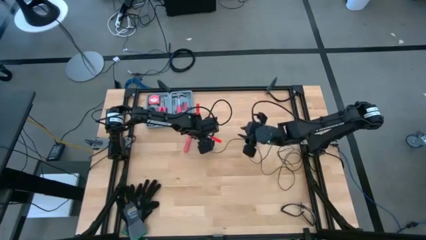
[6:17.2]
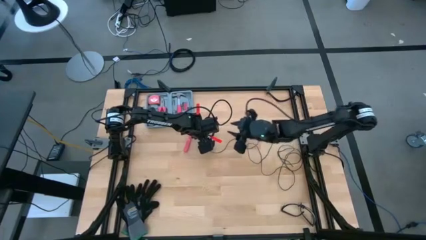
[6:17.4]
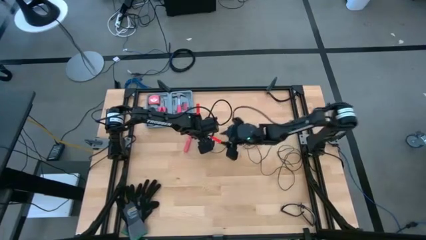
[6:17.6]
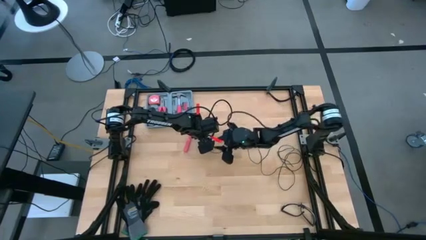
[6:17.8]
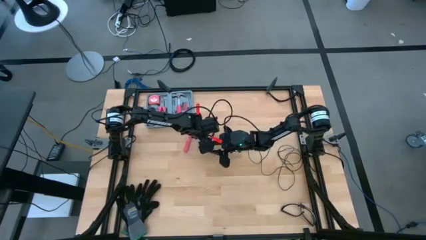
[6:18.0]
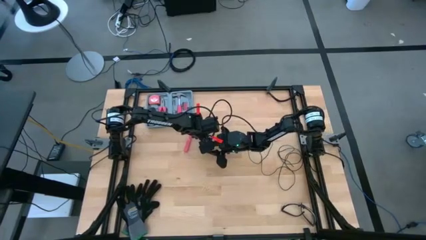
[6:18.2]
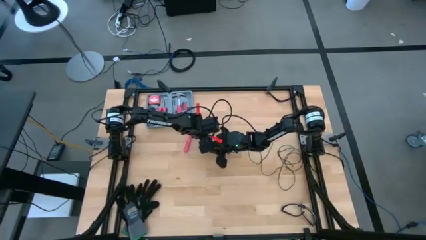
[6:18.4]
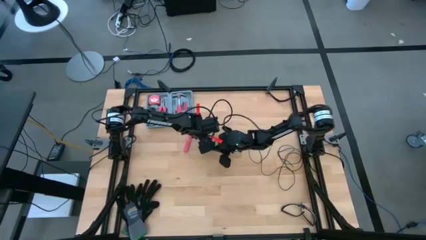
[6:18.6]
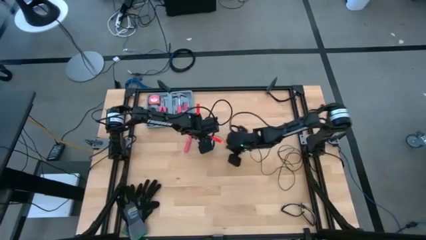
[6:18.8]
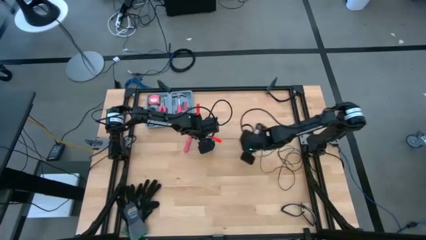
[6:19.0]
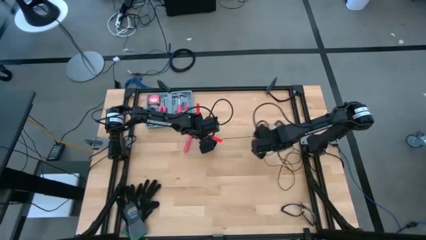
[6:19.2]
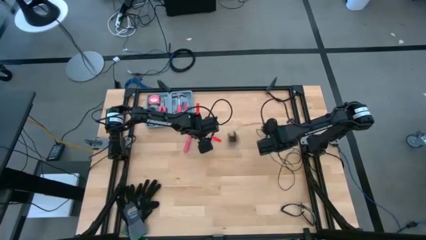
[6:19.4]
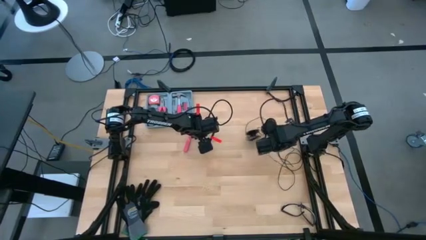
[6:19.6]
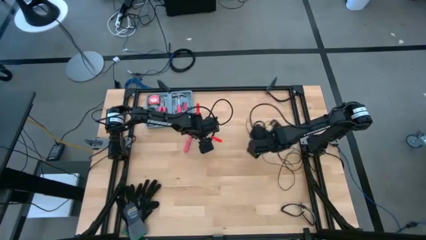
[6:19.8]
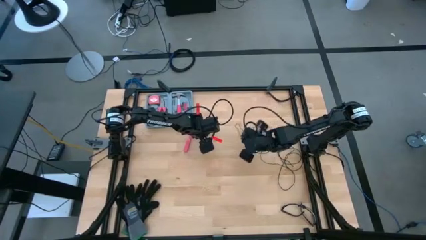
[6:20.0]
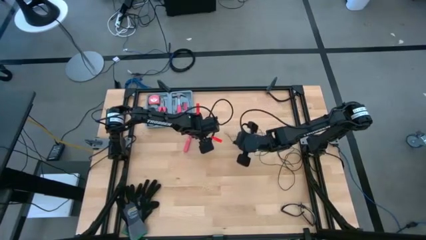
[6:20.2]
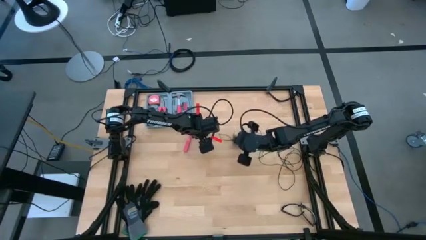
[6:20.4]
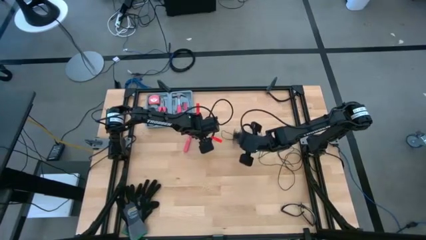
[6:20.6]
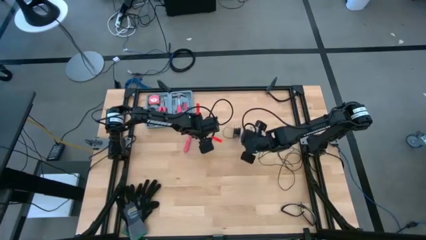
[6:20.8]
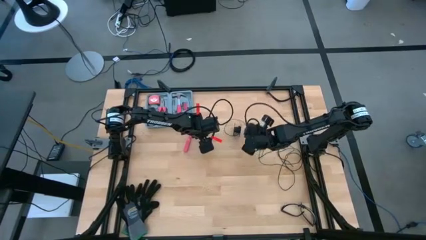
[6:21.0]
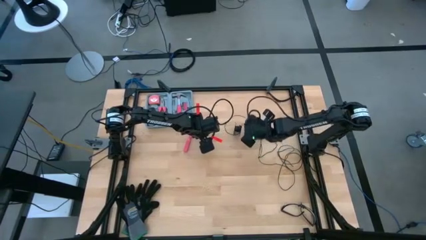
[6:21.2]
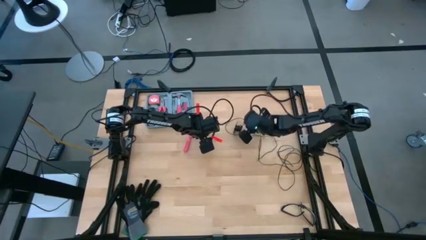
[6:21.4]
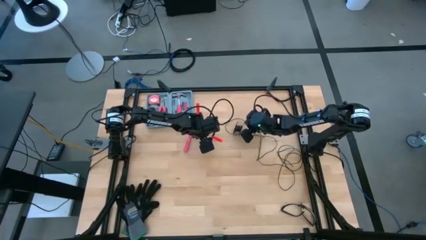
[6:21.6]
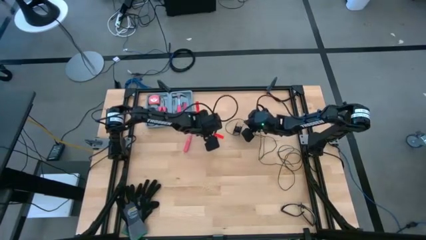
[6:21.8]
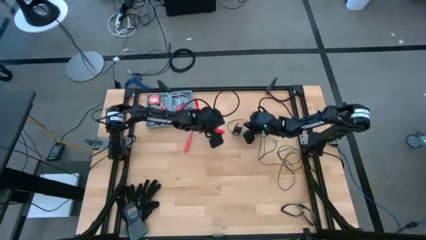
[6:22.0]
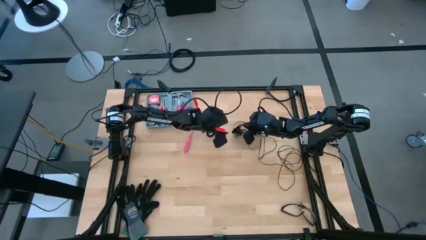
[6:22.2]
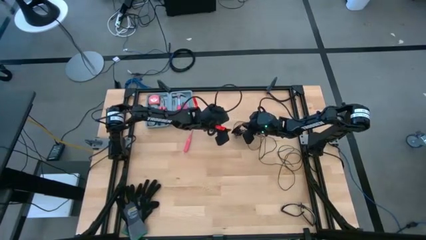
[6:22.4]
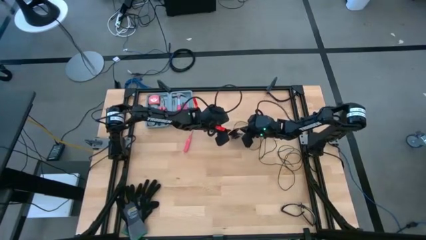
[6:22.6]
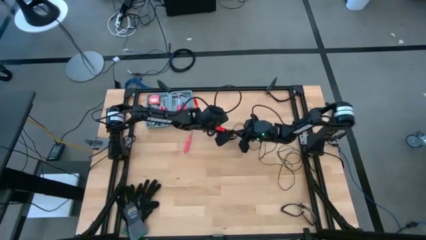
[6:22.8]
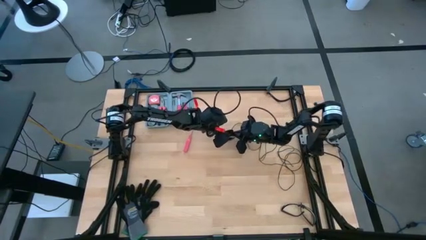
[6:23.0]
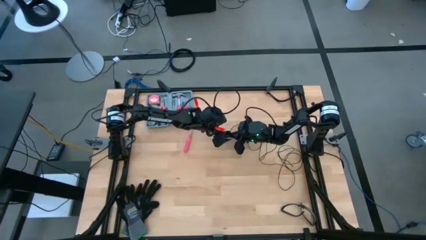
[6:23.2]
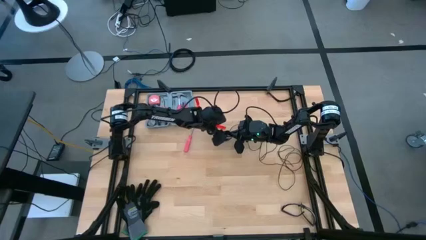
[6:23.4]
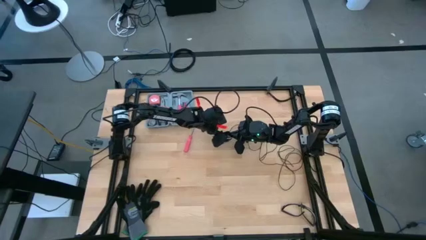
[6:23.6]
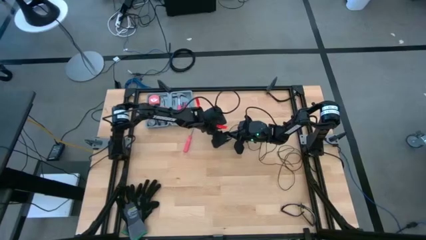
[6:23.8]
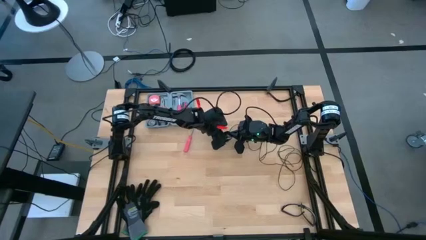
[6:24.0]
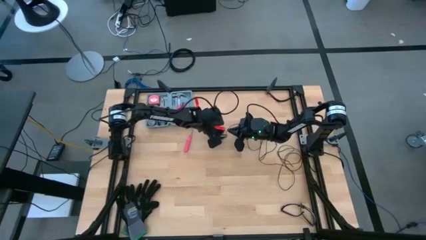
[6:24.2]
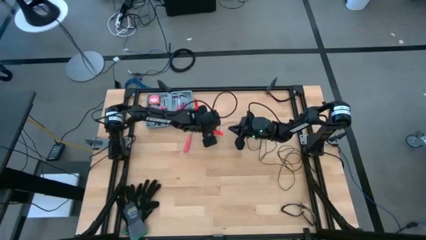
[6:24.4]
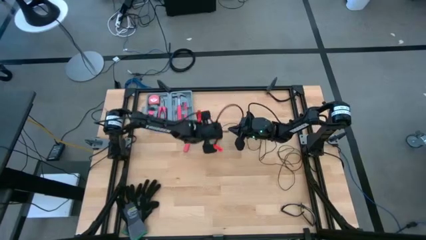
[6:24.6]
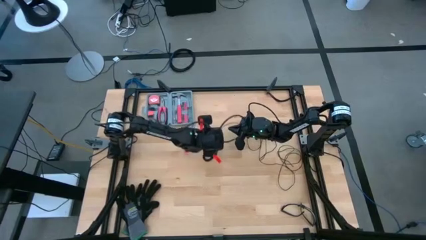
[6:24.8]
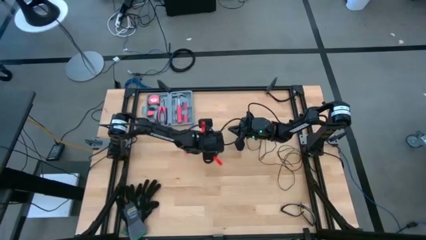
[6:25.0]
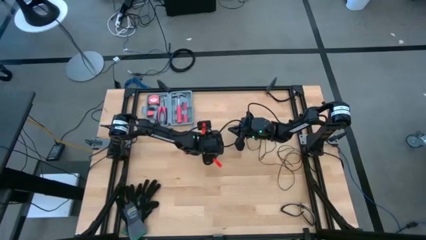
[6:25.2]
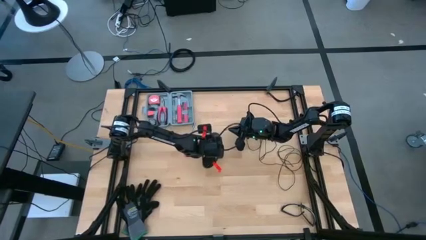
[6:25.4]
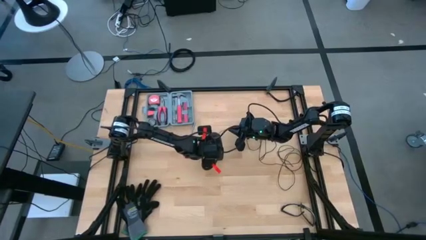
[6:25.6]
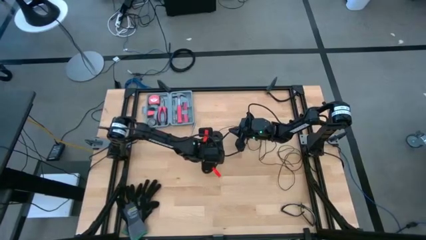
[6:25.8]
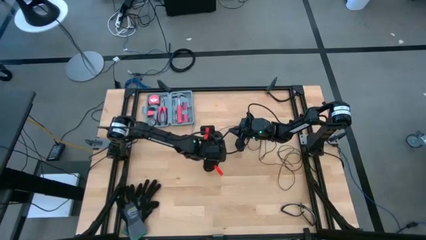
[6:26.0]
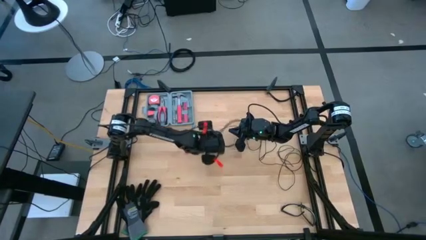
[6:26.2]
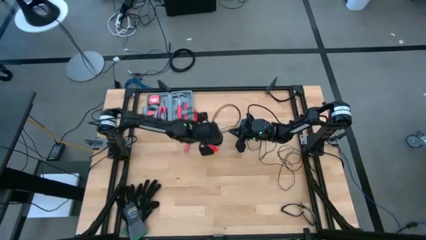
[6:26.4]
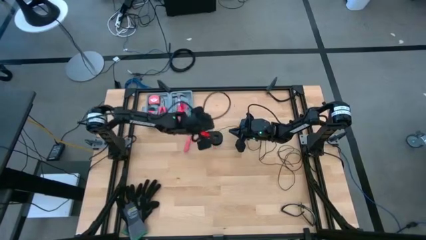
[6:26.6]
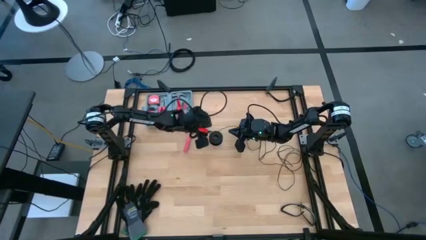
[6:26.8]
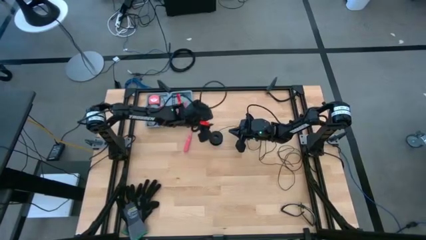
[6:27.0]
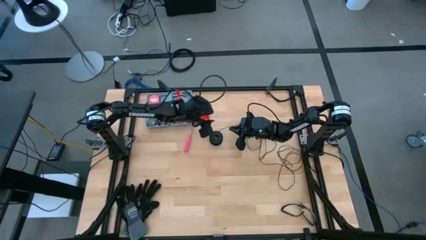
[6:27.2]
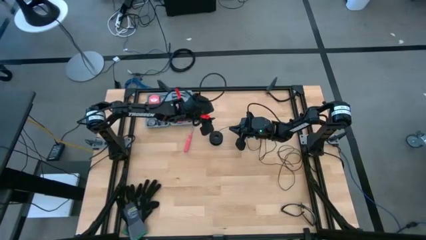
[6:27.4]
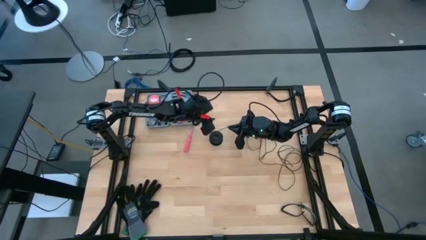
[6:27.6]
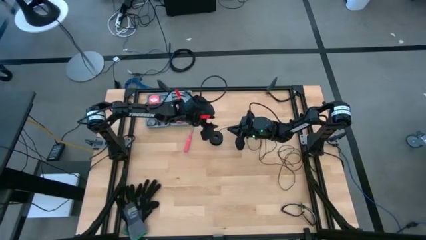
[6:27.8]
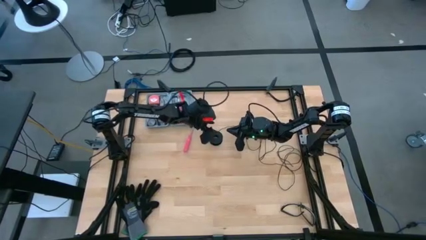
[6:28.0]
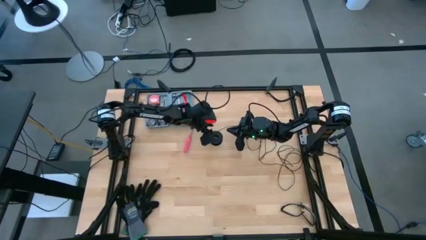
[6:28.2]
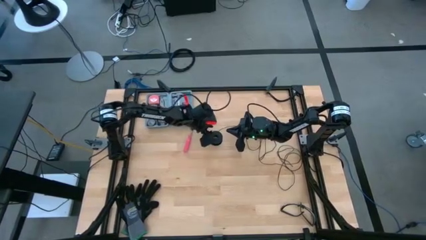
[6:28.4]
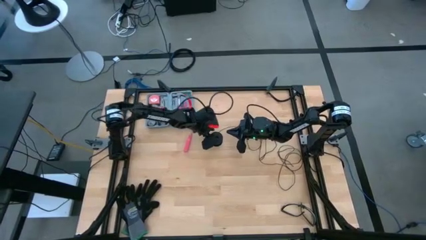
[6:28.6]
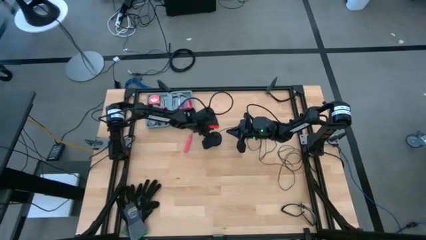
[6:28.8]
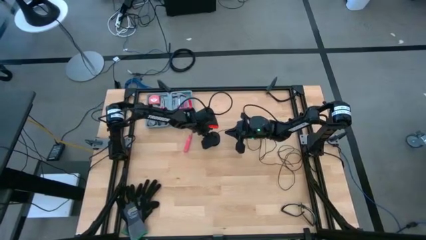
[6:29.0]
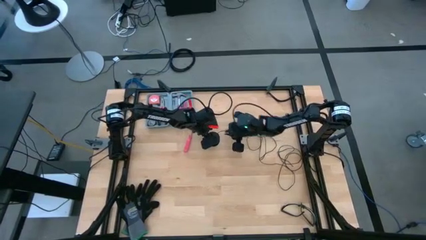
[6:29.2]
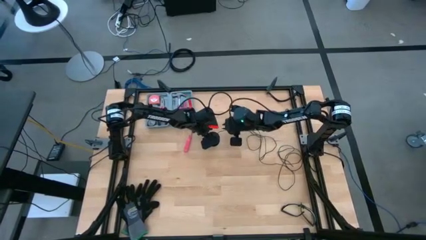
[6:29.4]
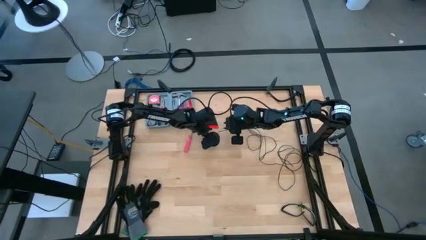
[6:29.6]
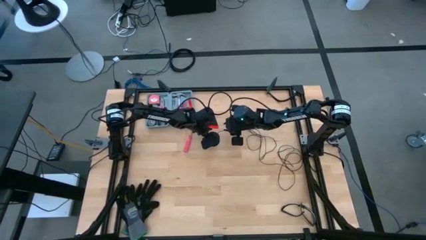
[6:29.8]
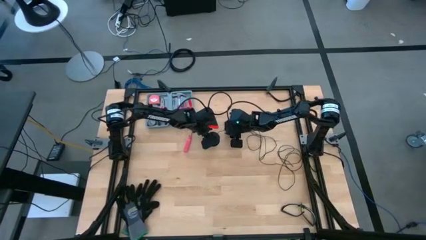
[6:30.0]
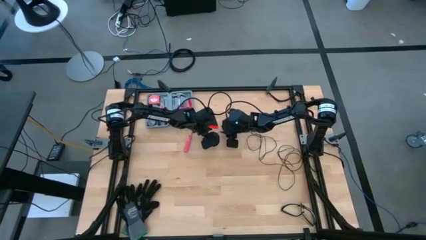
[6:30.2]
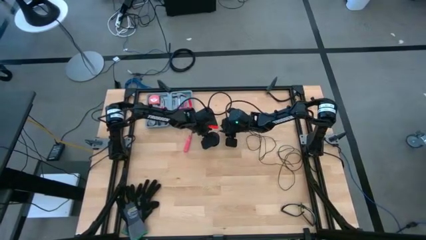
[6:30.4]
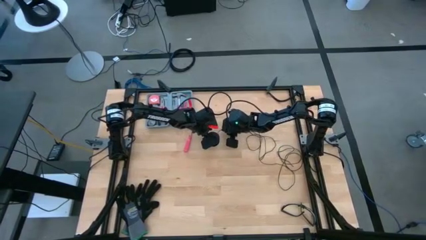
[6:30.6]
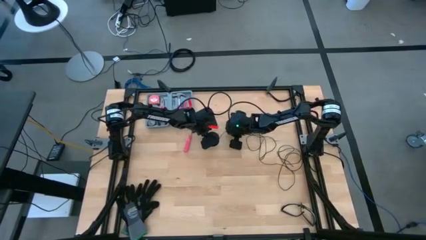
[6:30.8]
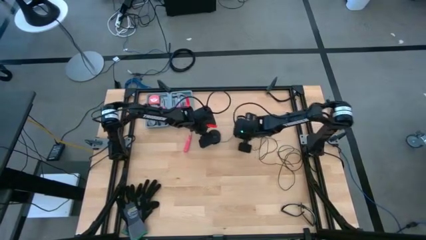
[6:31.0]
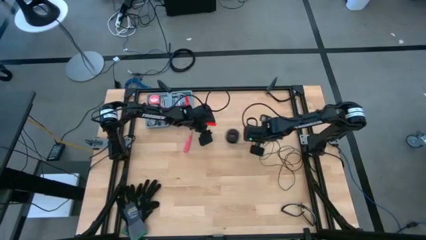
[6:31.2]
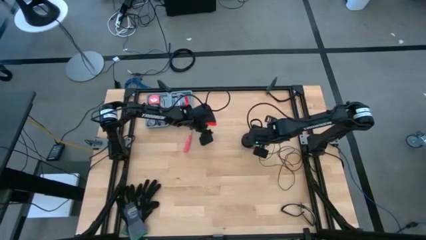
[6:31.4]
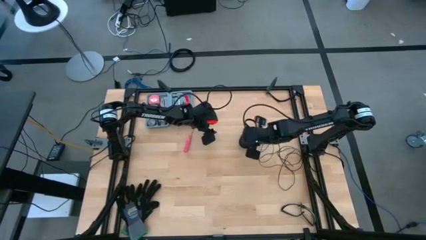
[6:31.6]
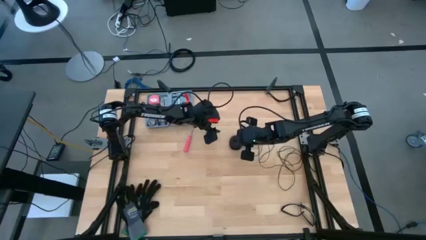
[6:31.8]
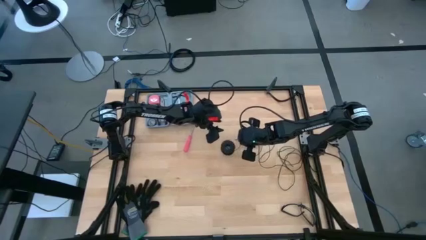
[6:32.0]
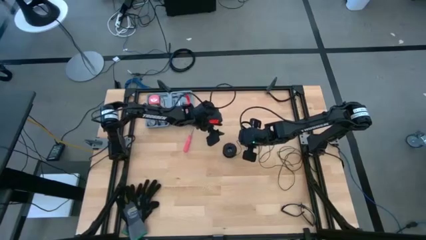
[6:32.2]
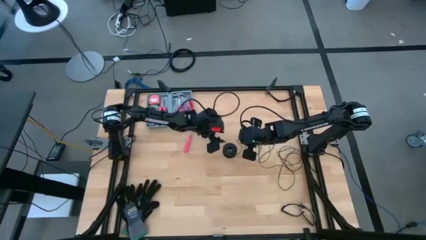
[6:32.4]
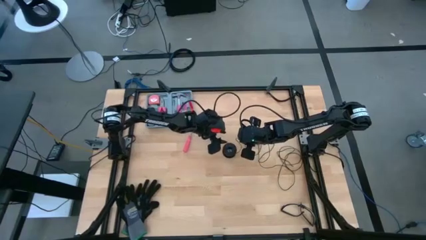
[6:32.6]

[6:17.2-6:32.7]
Task: Coil cords
Uncoil the black wire from the spool
